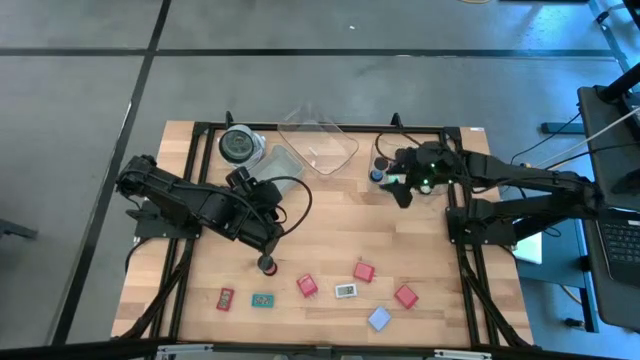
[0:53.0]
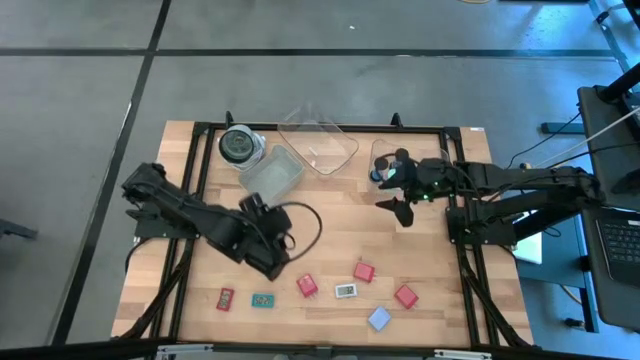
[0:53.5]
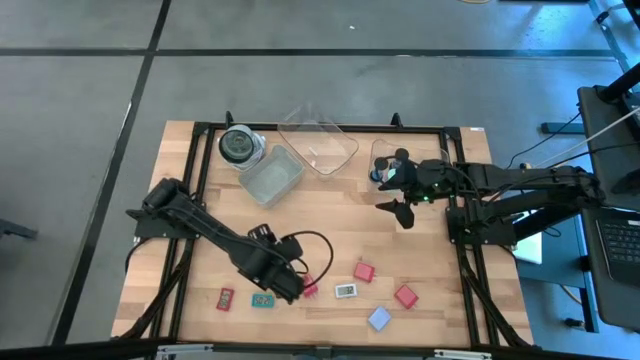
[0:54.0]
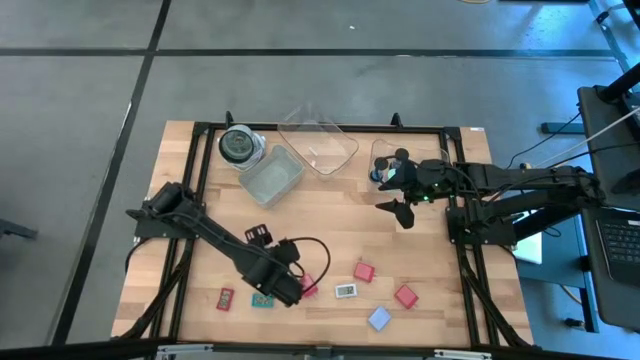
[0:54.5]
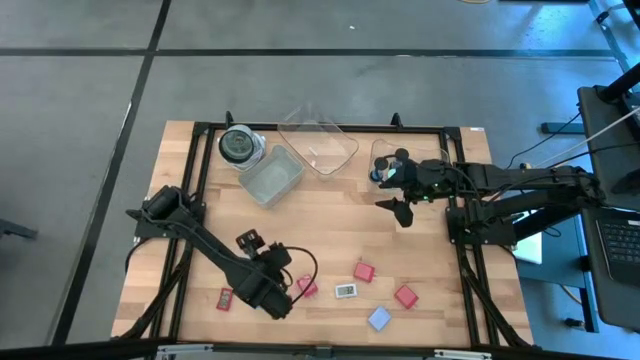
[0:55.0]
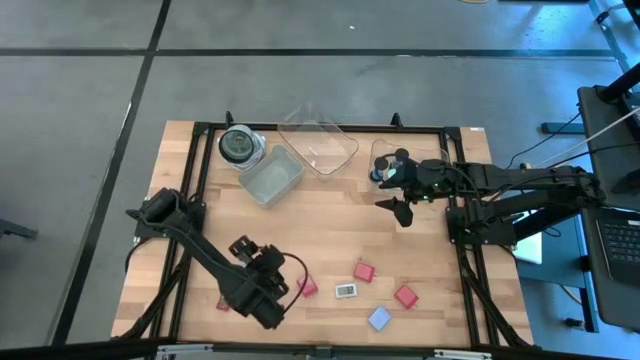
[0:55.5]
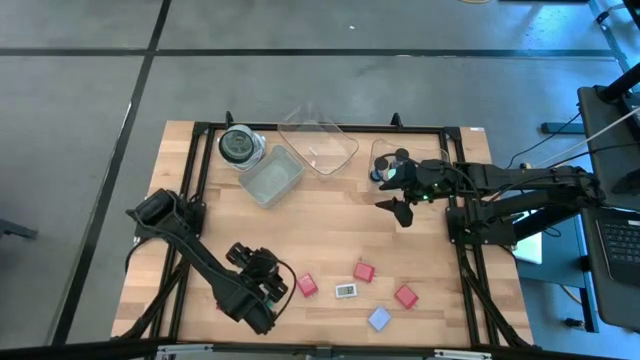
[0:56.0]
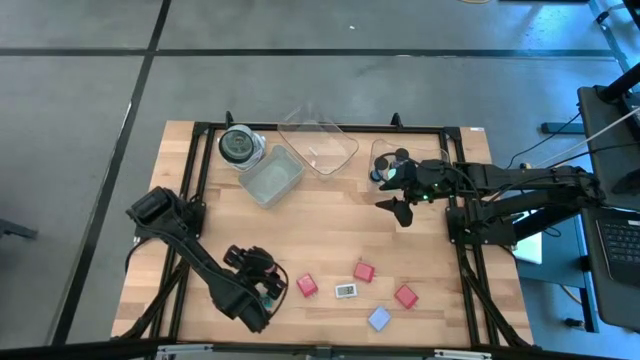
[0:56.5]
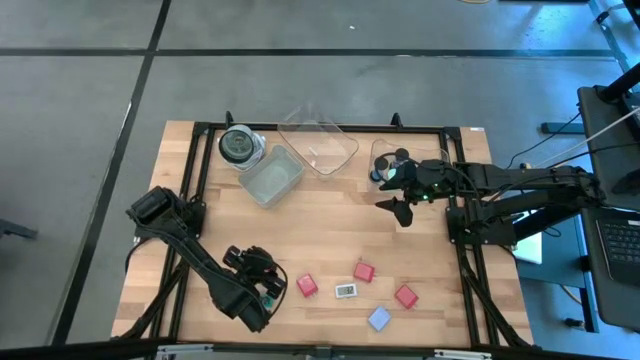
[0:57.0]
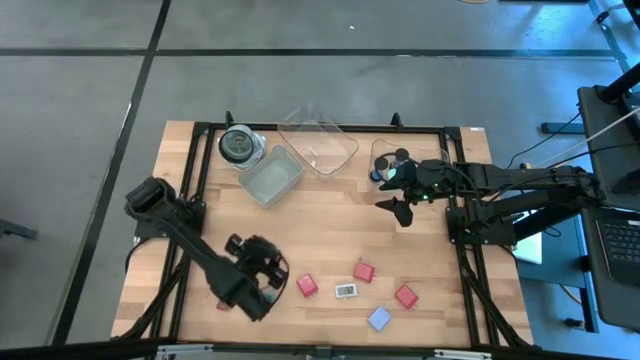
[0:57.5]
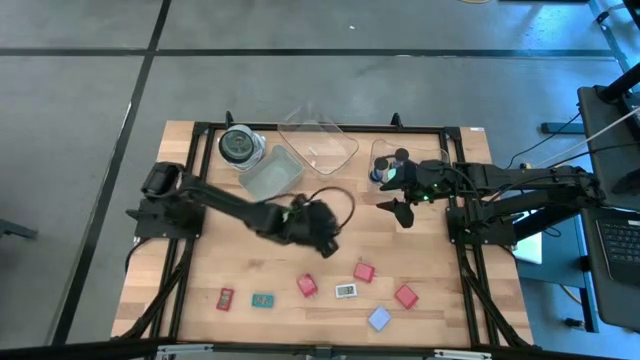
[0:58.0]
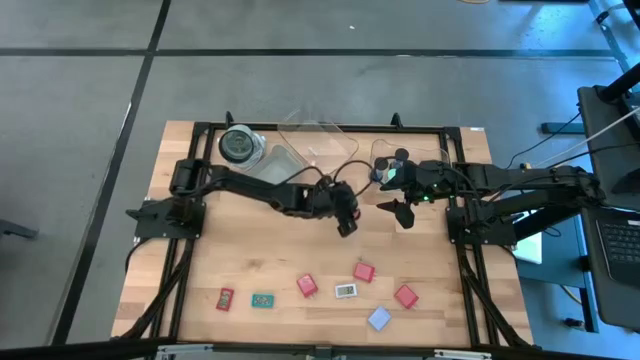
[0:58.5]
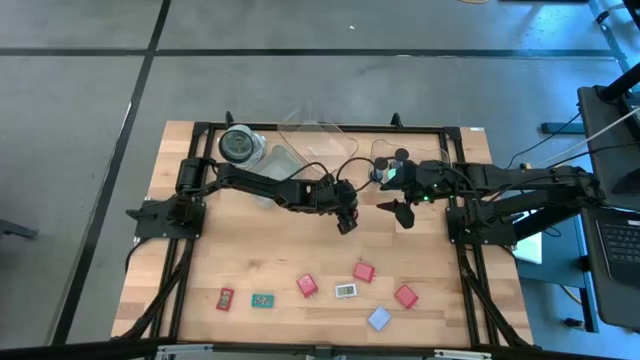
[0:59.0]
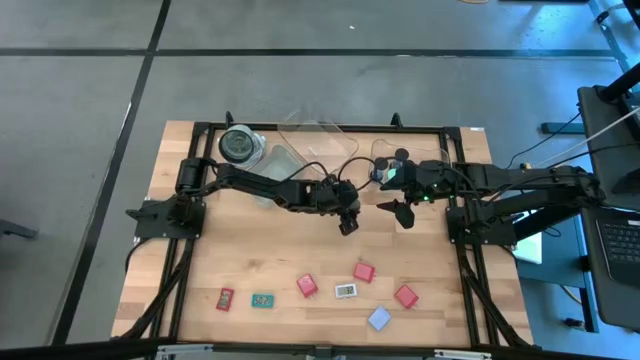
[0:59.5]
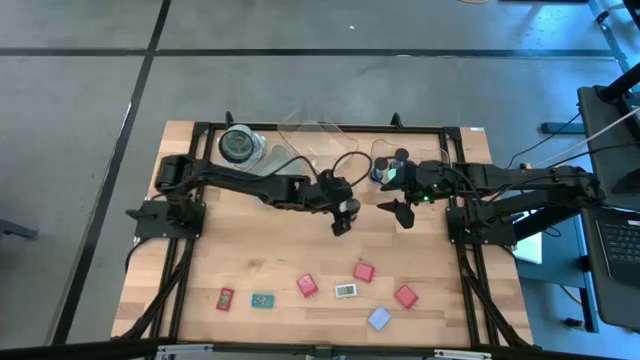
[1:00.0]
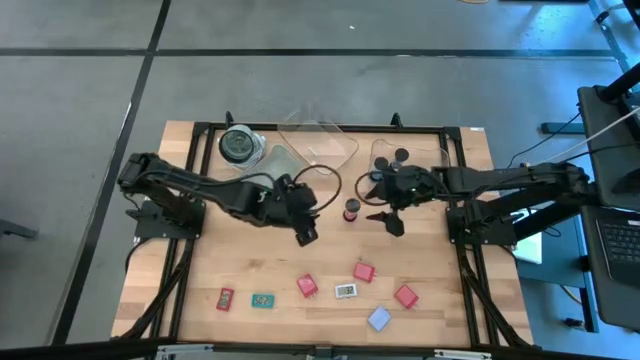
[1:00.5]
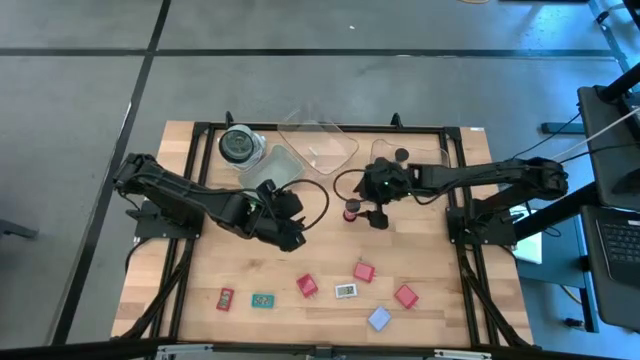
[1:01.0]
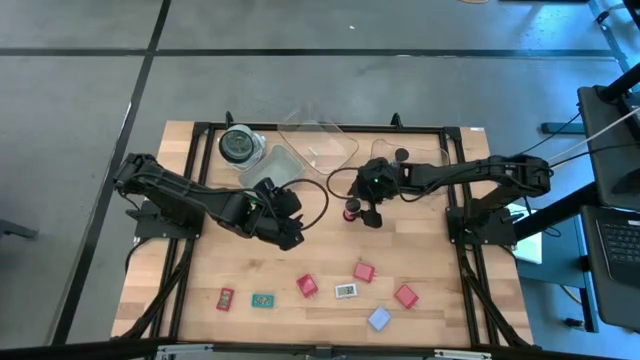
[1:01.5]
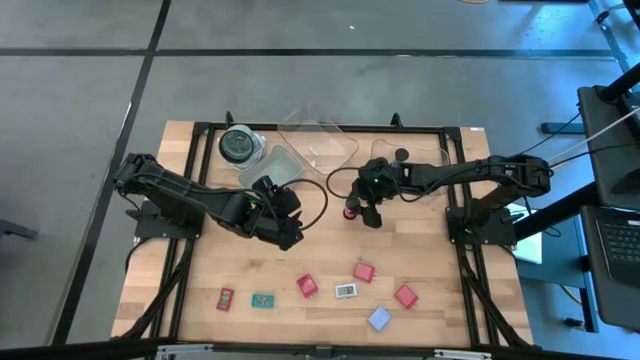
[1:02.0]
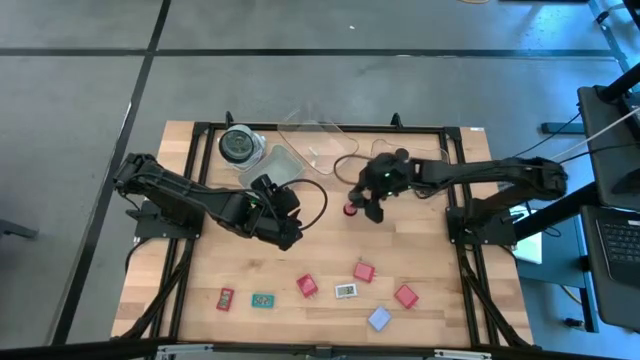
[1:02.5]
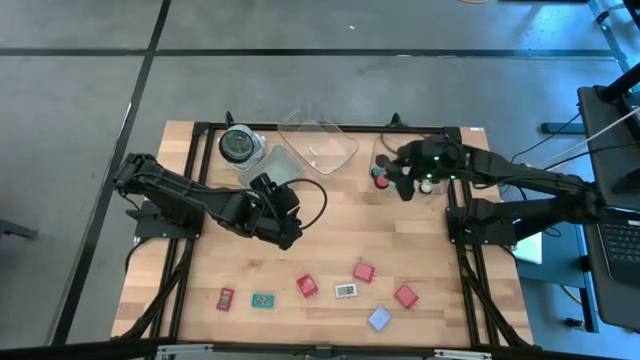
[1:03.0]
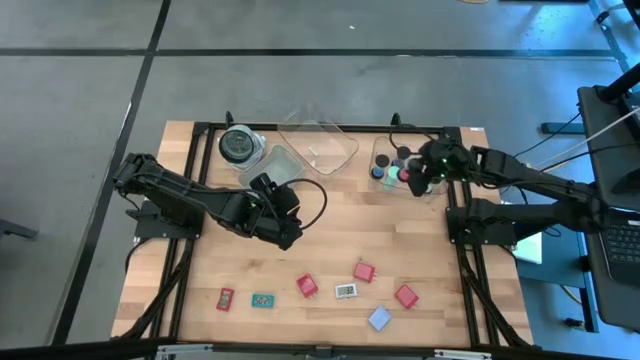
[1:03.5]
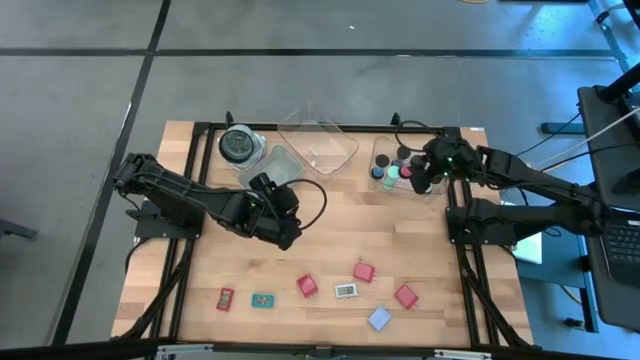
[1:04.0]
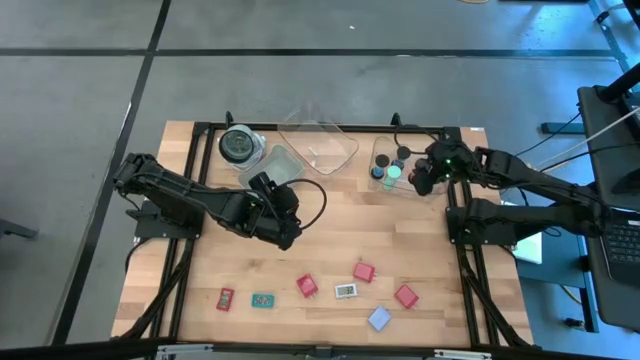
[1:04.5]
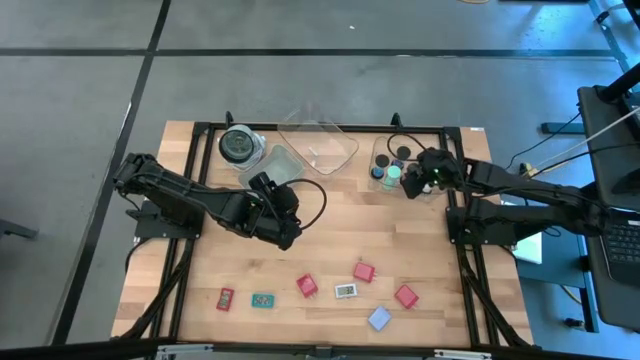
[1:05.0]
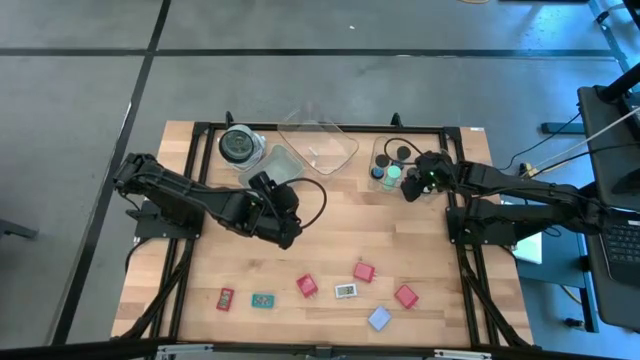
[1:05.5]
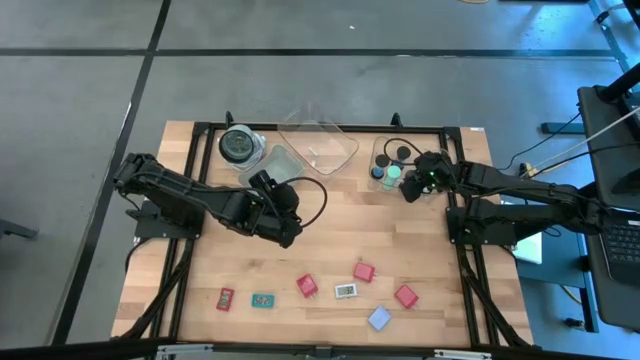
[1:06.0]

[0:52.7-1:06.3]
Task: Pick & Place Office items
Put the red hourglass into the right transparent bin

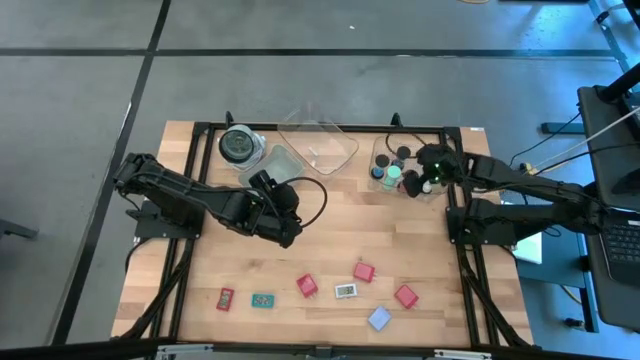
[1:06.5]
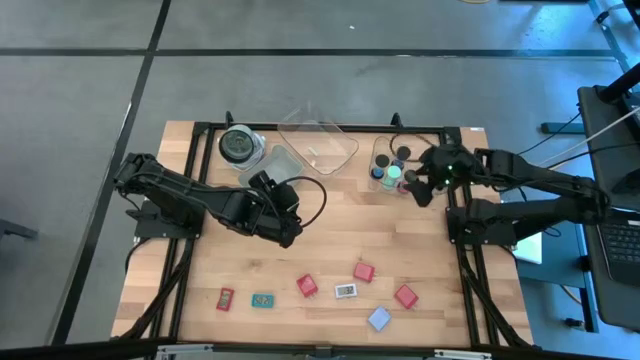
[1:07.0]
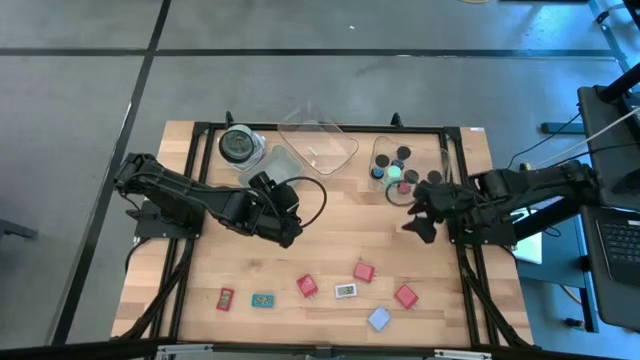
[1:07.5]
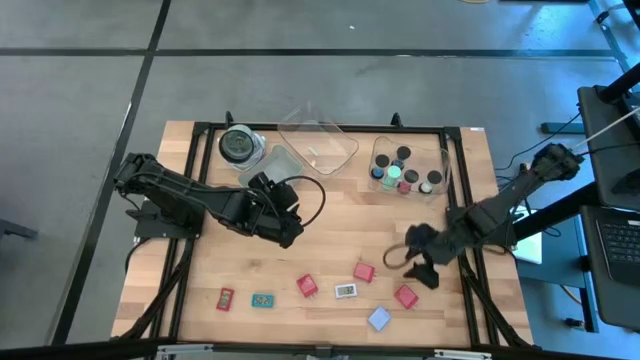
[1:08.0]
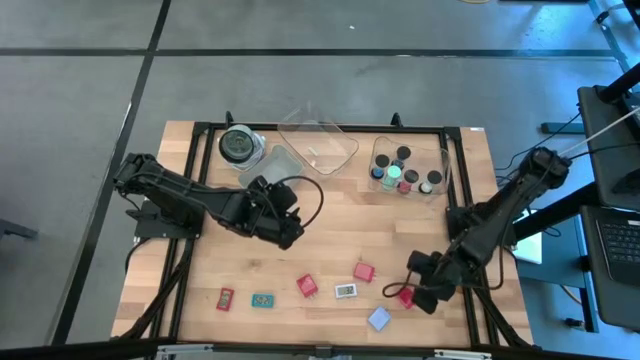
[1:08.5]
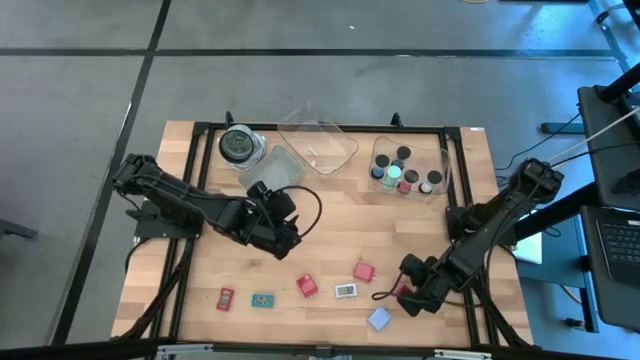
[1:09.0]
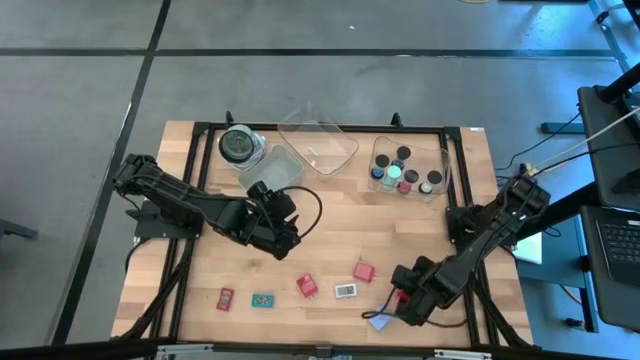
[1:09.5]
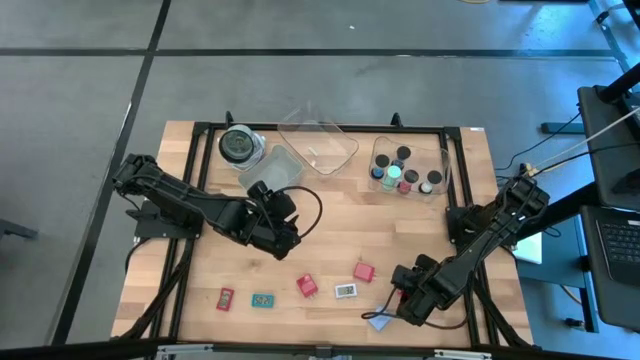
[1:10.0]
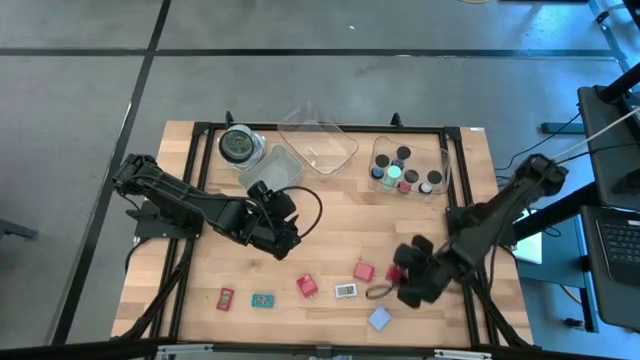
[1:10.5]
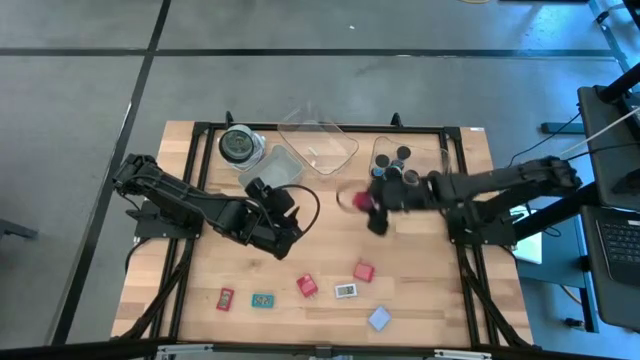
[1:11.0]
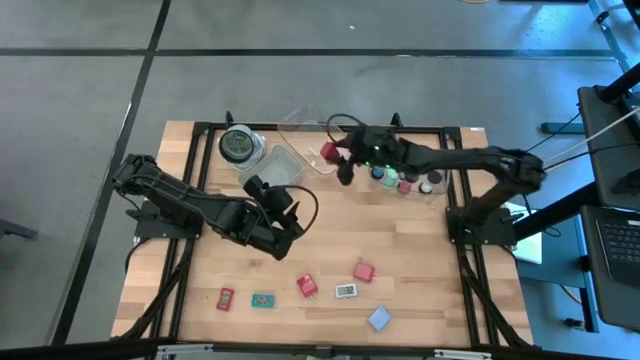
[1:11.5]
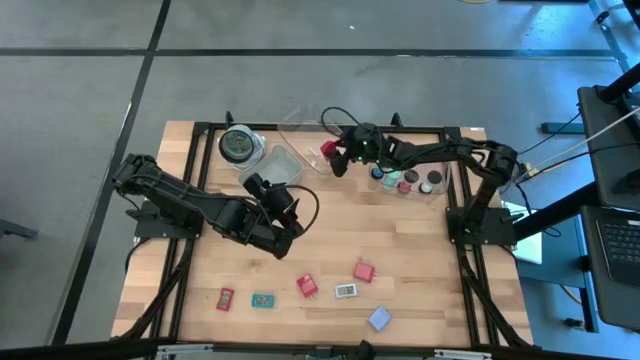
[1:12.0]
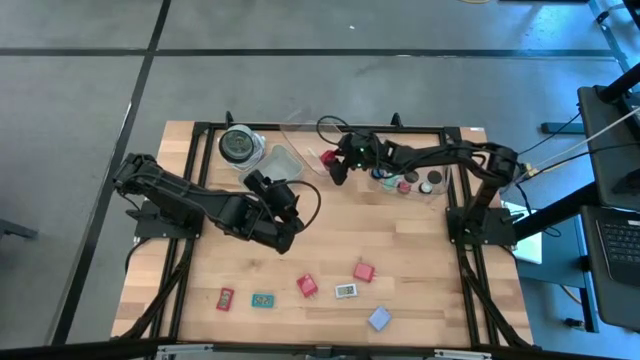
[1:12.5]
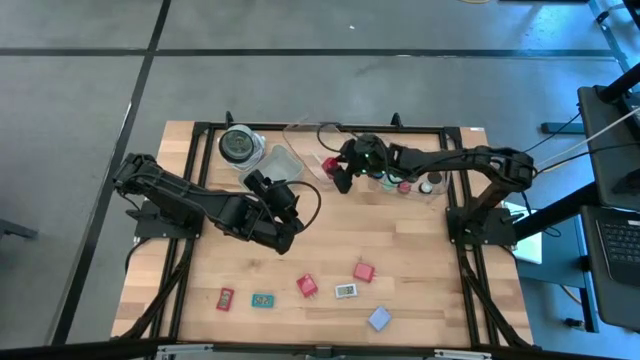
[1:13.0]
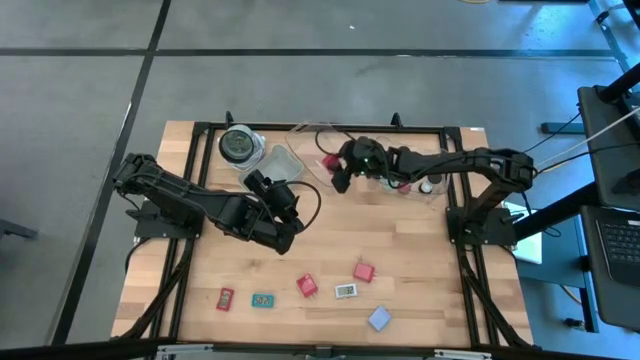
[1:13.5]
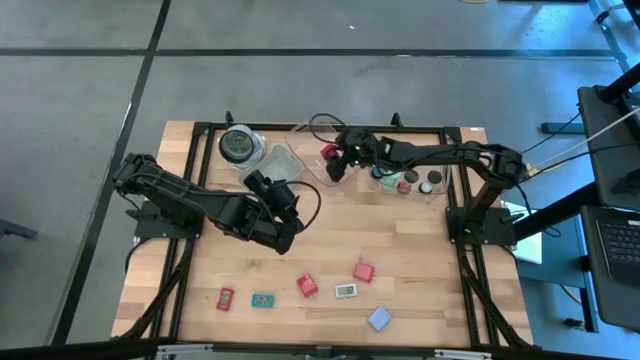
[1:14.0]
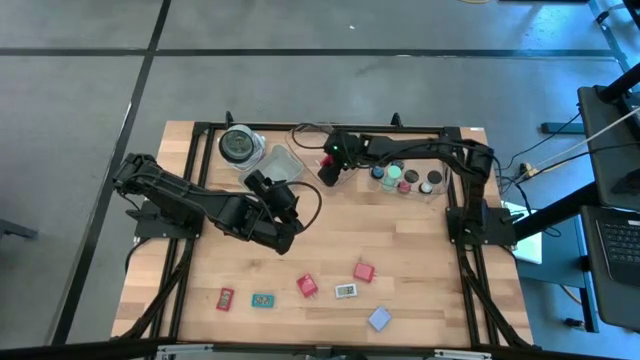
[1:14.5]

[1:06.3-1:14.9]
Put the right red charger adapter into the left transparent bin
